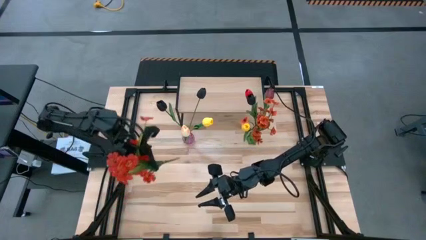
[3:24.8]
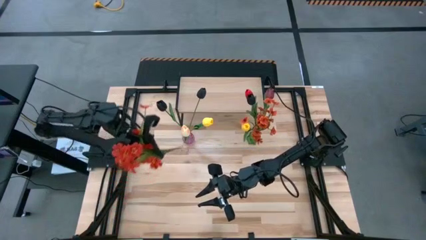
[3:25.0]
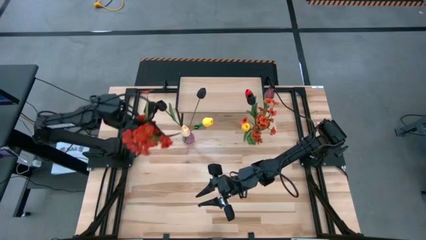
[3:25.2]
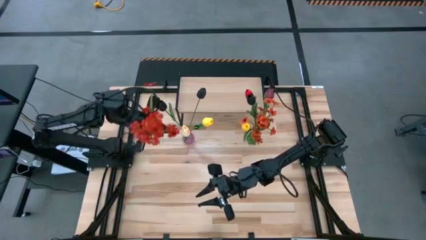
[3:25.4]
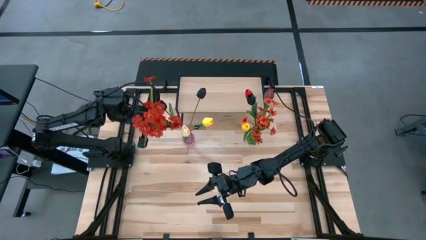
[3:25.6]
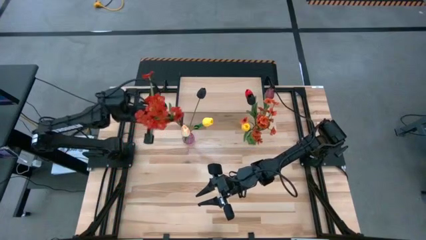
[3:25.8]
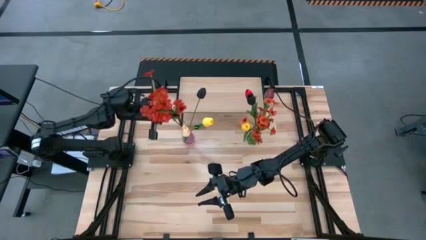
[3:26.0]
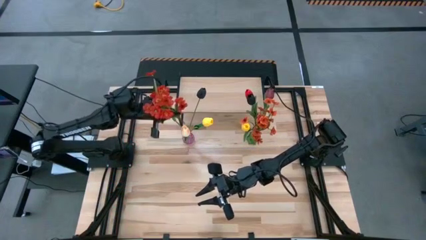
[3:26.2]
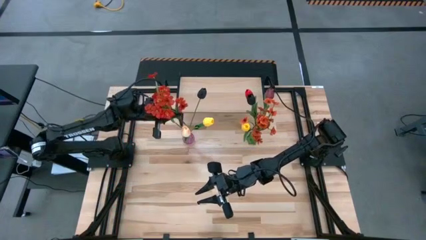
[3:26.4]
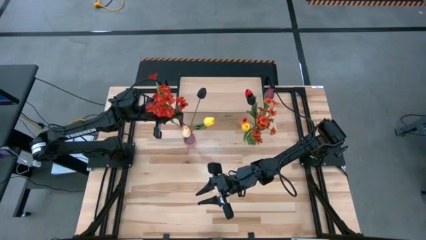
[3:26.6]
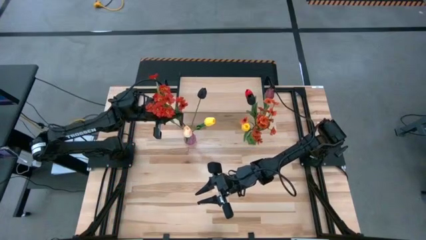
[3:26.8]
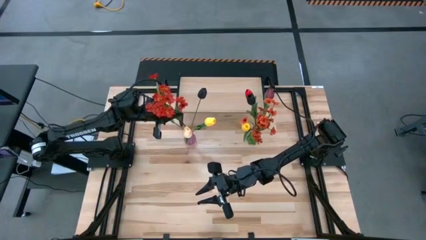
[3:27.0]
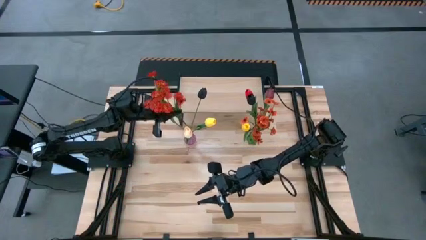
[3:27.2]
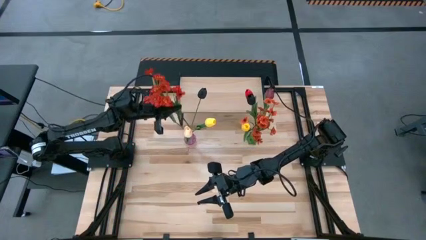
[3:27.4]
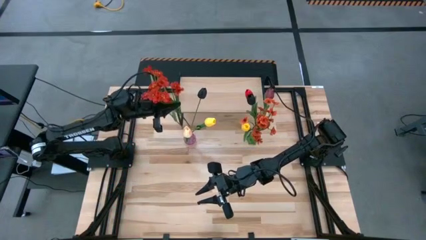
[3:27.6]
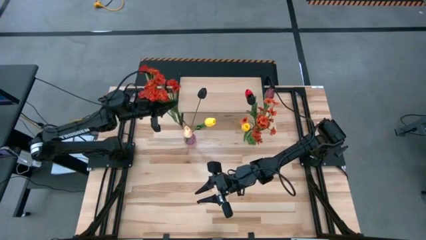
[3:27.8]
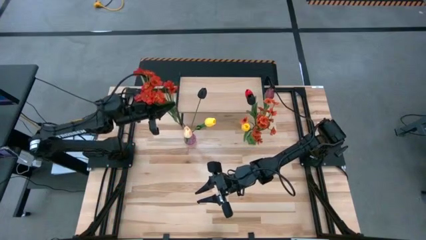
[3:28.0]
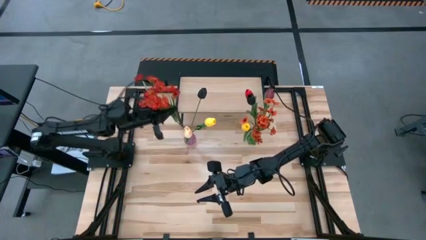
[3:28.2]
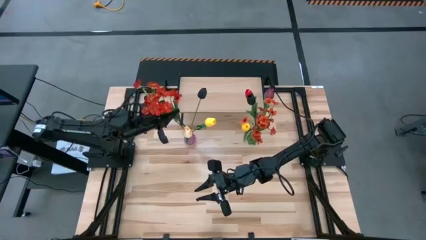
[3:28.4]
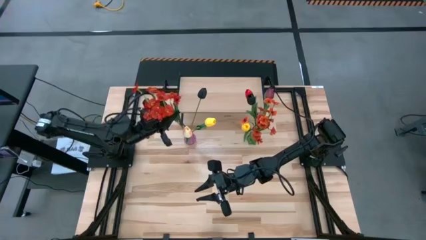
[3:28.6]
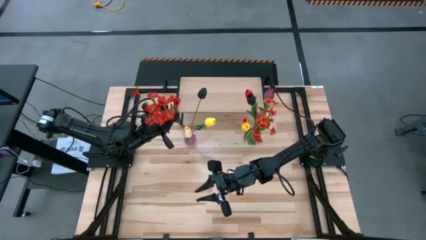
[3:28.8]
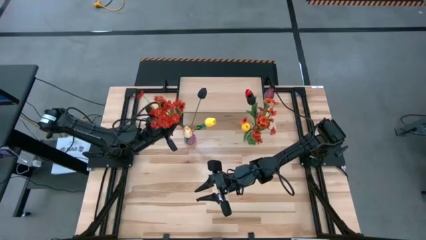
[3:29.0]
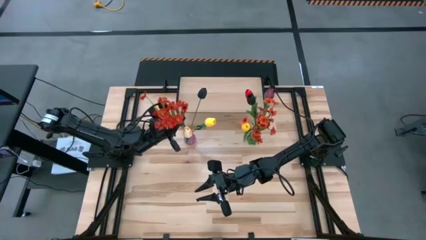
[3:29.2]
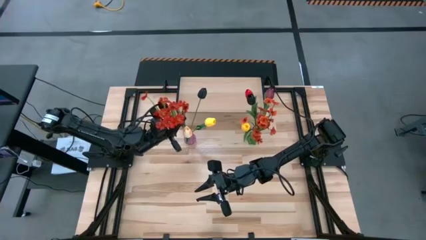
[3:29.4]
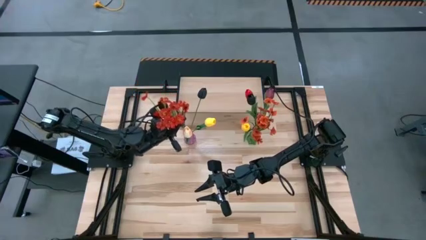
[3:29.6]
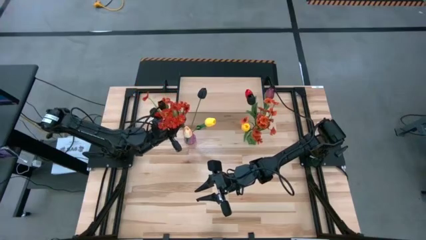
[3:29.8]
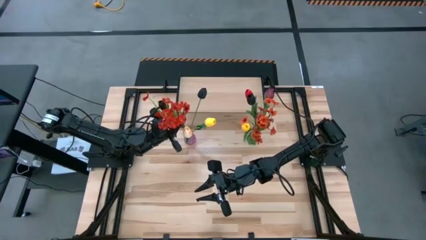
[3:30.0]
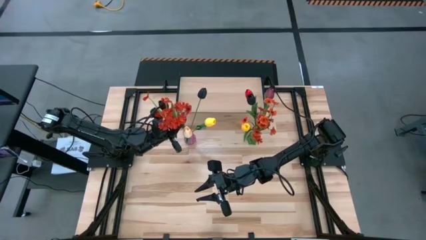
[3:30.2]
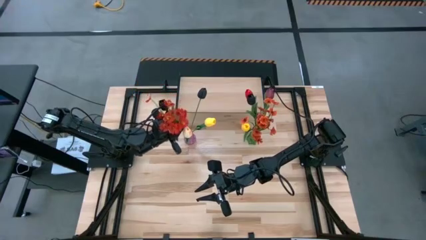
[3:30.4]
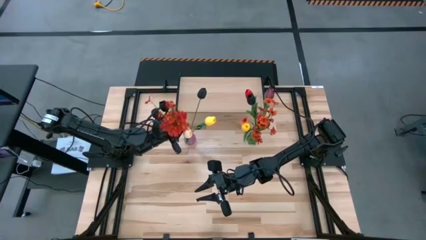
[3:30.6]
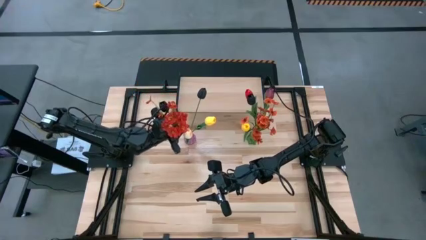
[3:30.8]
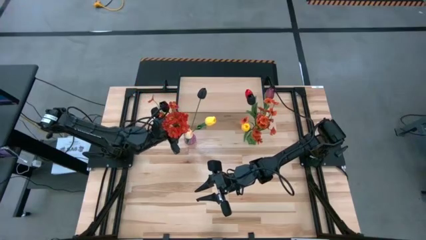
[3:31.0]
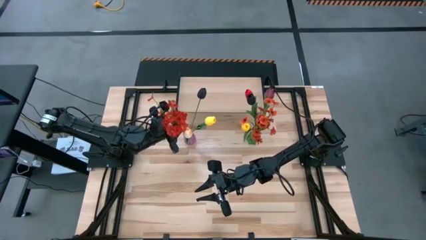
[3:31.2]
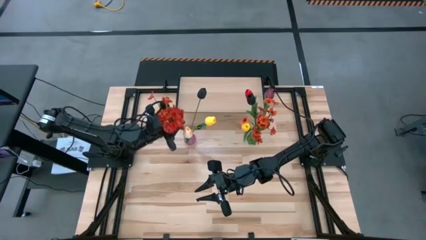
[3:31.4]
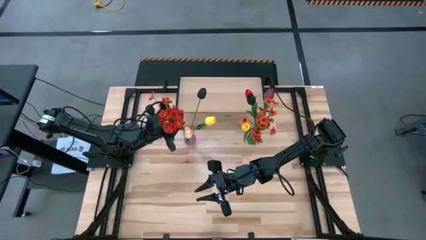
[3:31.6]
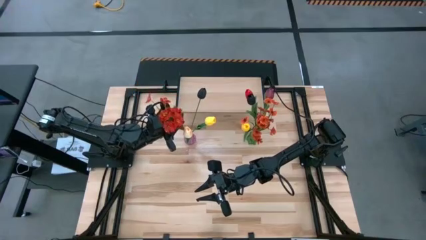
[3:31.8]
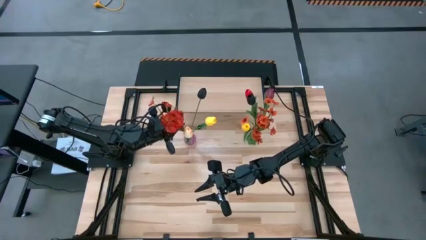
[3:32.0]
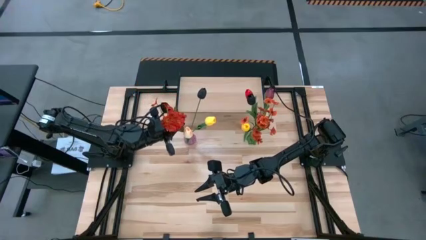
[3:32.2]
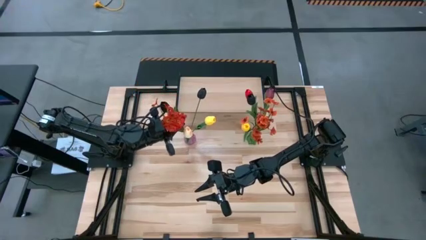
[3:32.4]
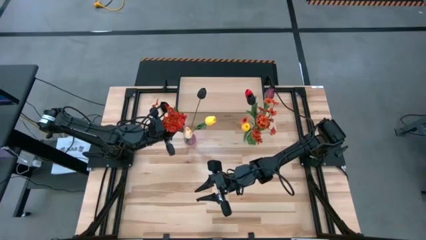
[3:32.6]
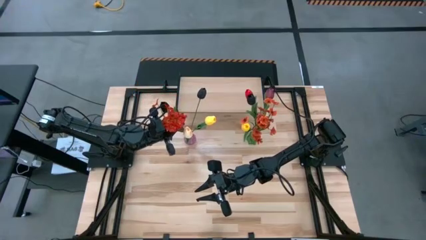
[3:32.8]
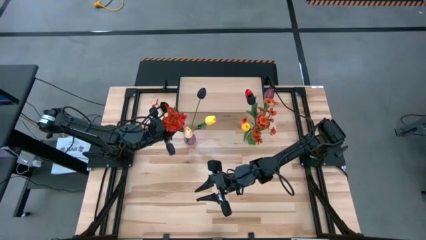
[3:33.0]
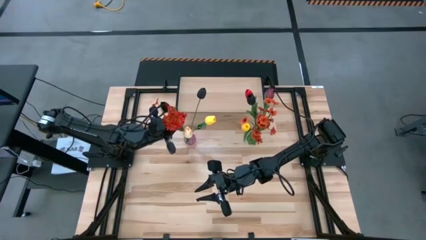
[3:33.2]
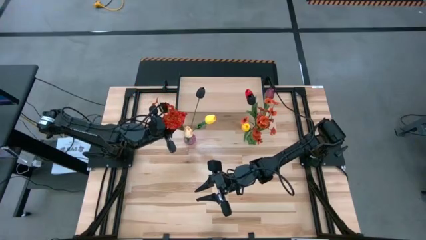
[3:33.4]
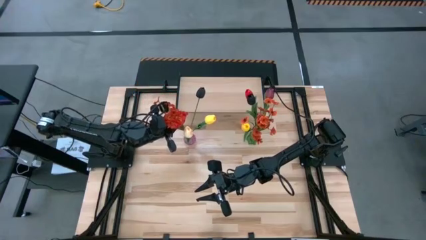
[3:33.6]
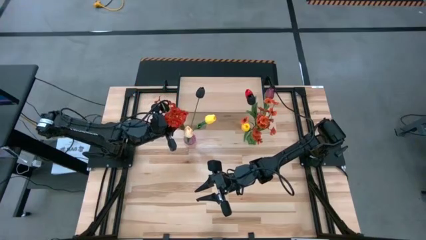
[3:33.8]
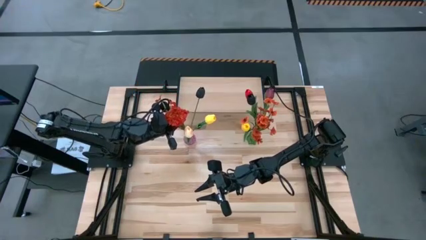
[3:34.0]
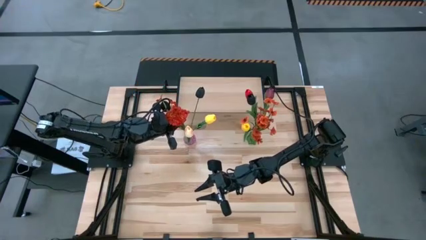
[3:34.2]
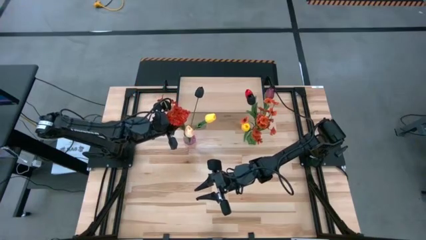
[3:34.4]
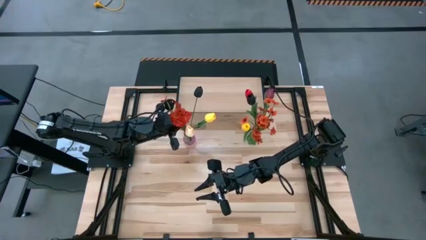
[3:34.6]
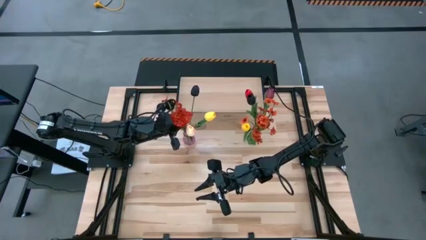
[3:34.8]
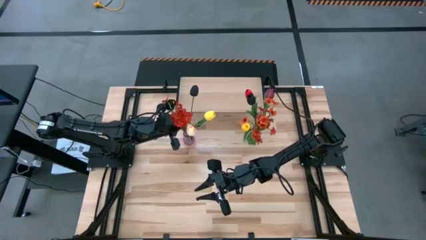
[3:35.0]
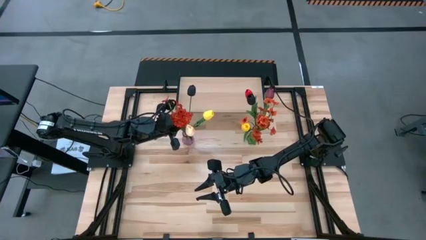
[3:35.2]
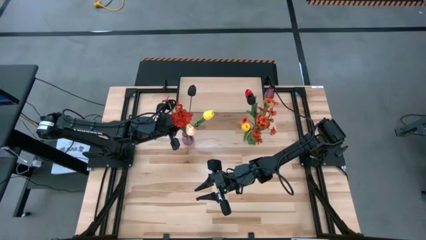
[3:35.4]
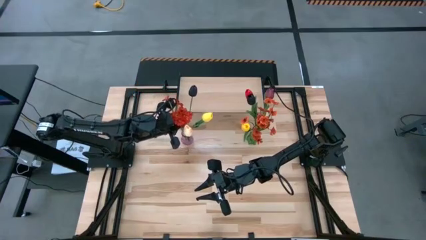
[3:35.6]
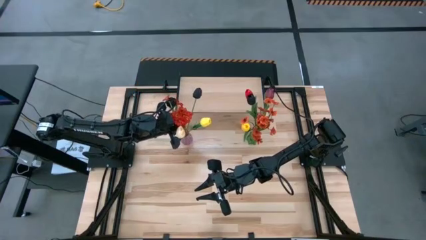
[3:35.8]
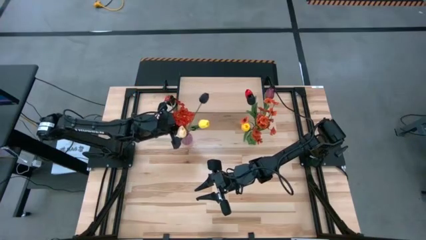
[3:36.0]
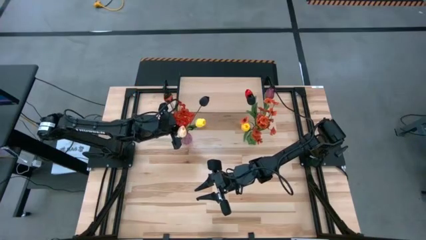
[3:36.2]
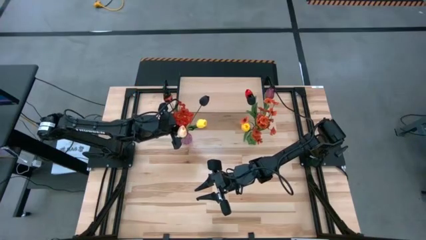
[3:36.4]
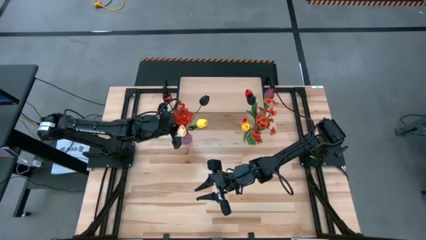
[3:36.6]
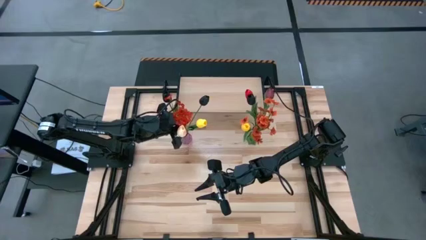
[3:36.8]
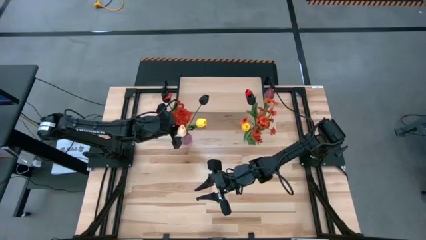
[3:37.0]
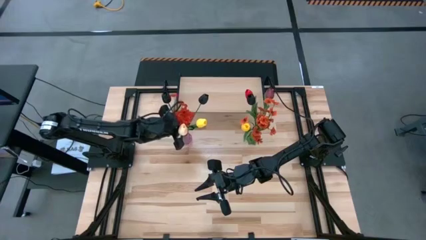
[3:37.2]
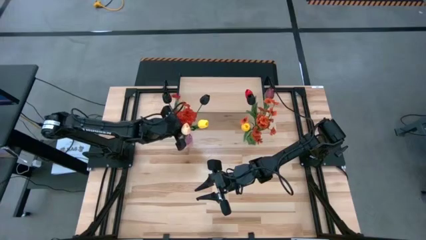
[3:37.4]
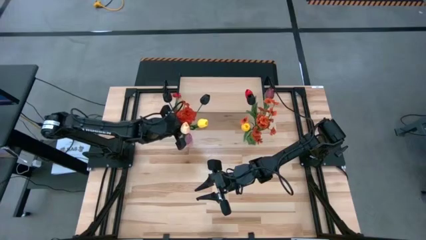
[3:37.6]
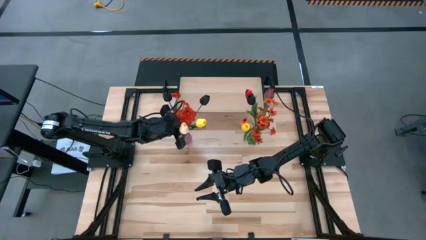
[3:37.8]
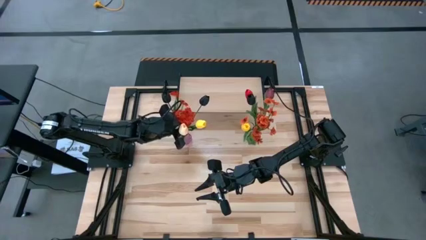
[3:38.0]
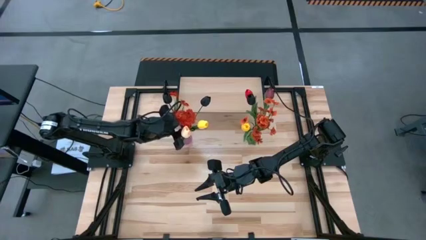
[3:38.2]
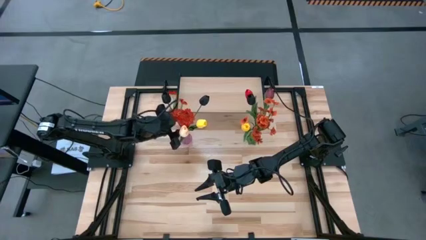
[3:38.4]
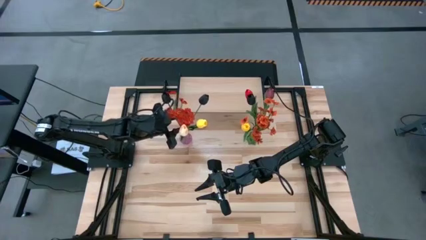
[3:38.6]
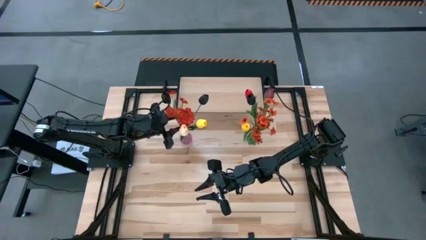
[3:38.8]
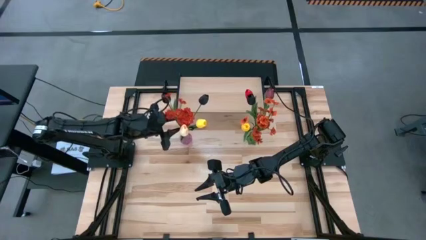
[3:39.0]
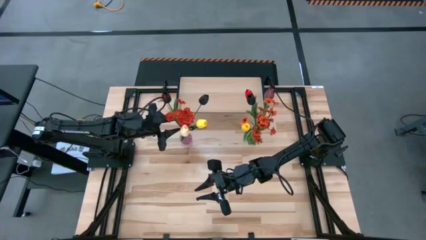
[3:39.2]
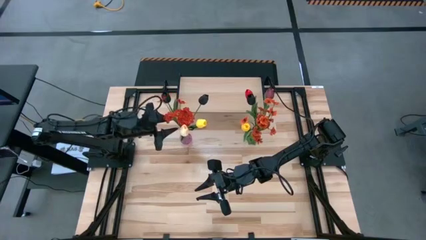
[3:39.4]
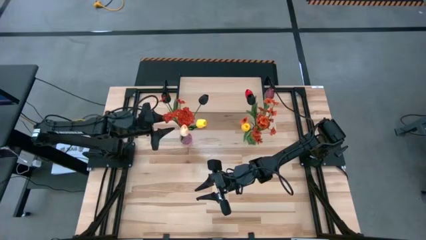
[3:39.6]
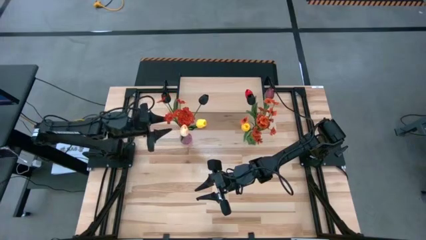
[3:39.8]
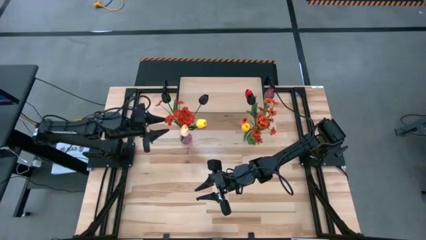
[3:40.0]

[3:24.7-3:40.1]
Task: Pick and place flowers into a vace then onto a shelf
Put the orange flowers into the purple vase
